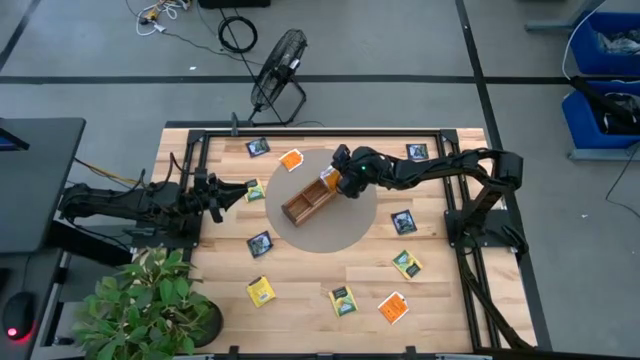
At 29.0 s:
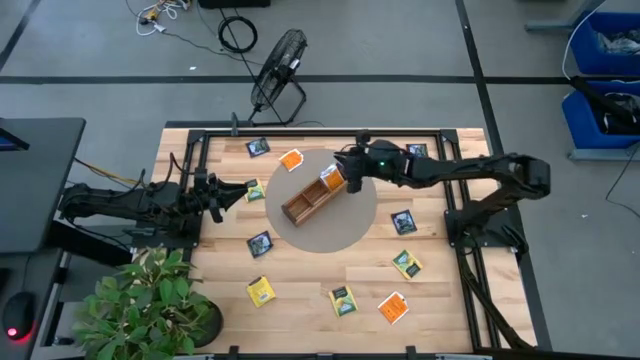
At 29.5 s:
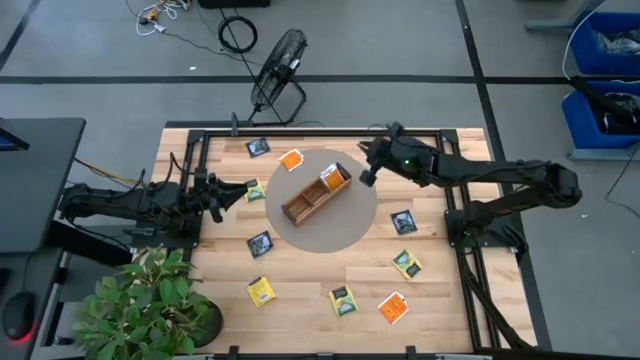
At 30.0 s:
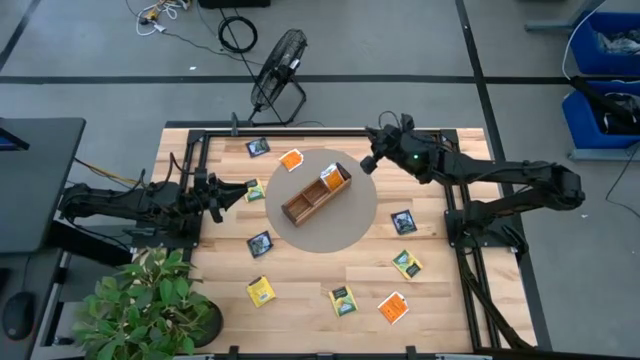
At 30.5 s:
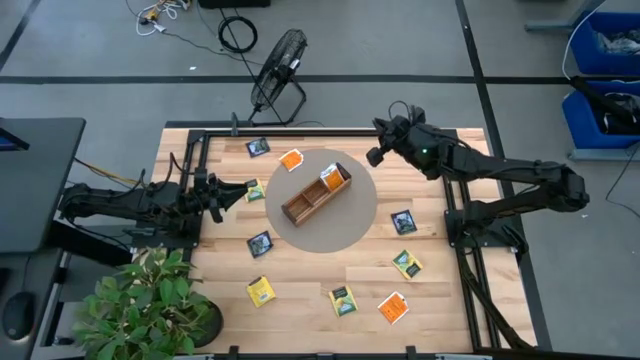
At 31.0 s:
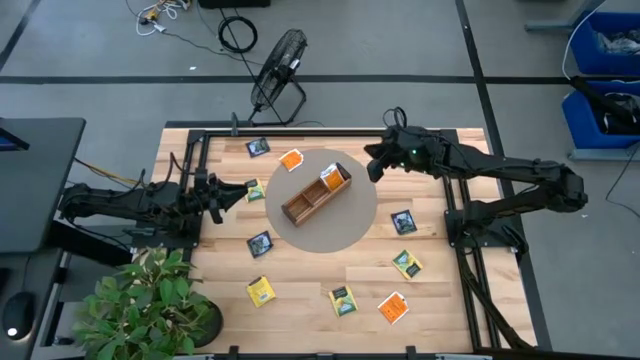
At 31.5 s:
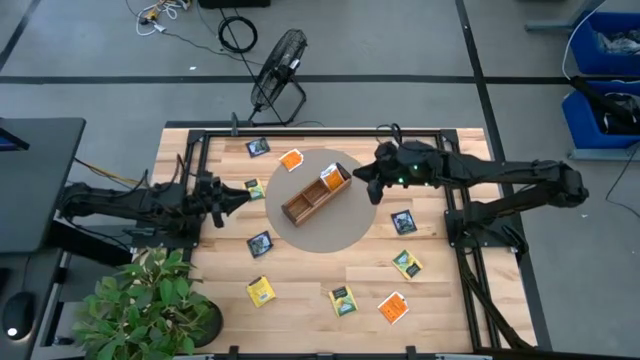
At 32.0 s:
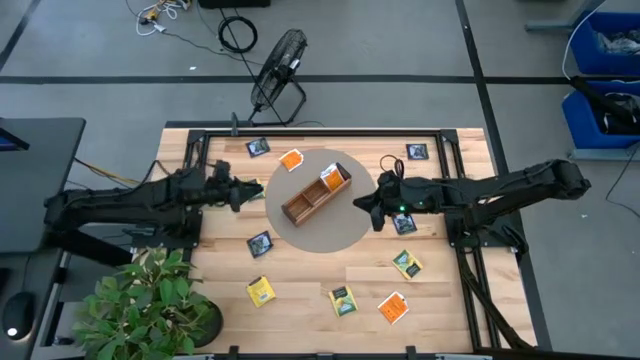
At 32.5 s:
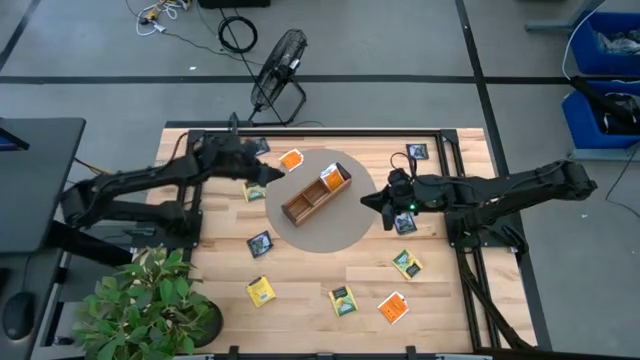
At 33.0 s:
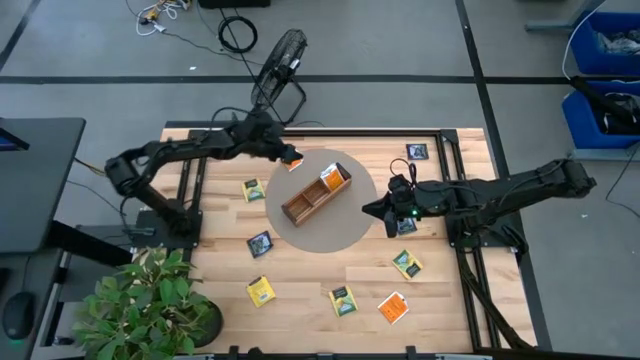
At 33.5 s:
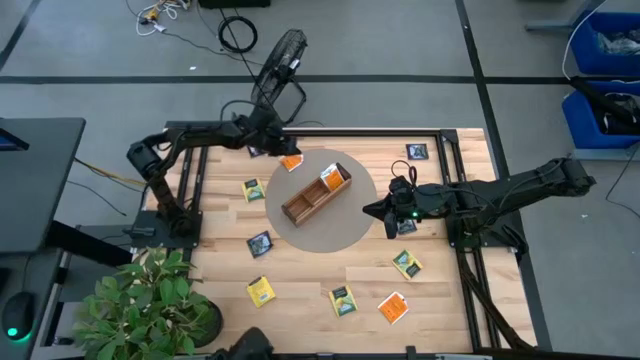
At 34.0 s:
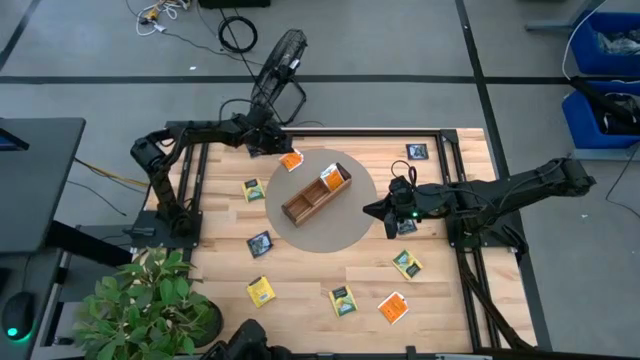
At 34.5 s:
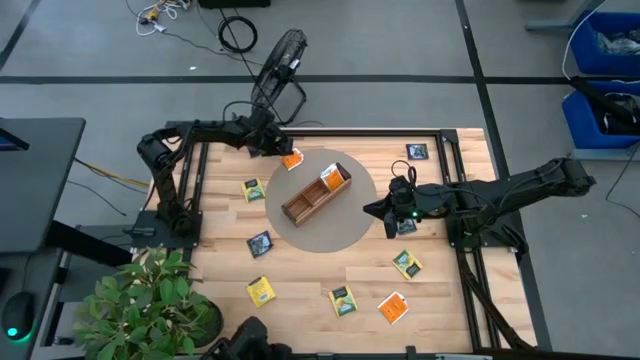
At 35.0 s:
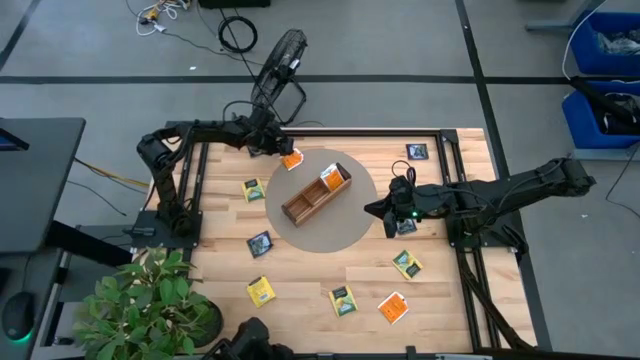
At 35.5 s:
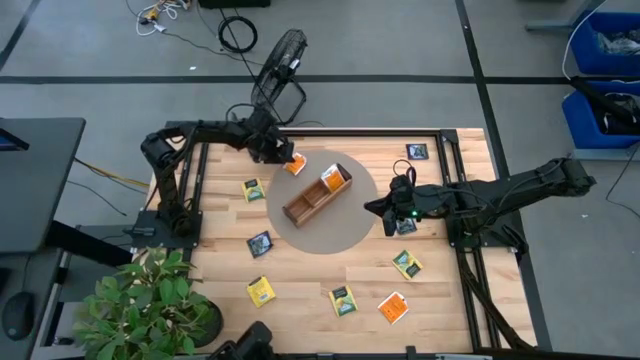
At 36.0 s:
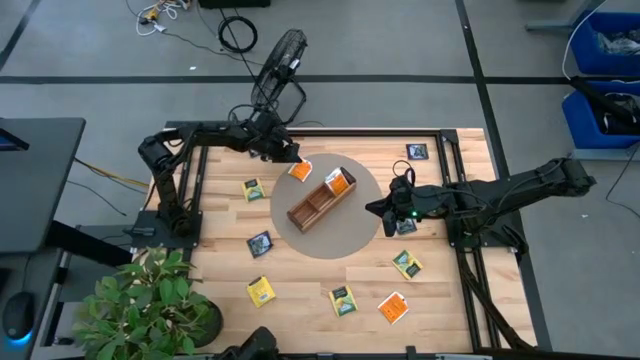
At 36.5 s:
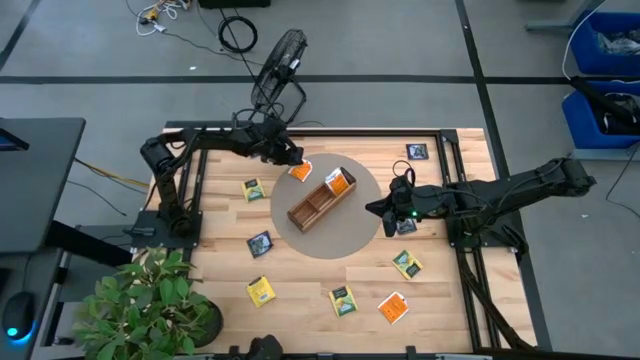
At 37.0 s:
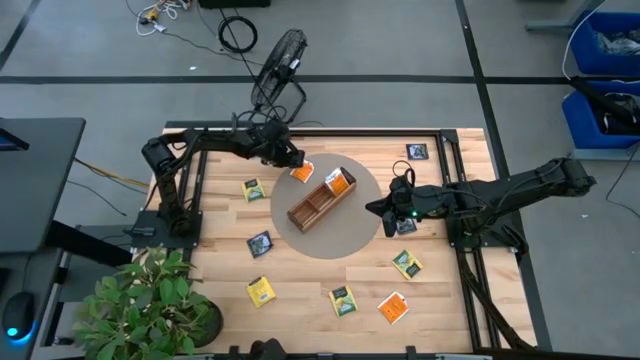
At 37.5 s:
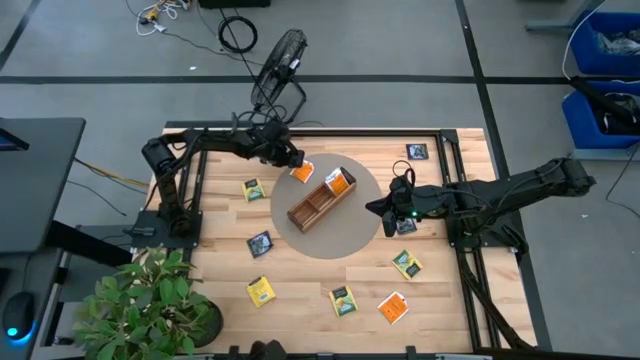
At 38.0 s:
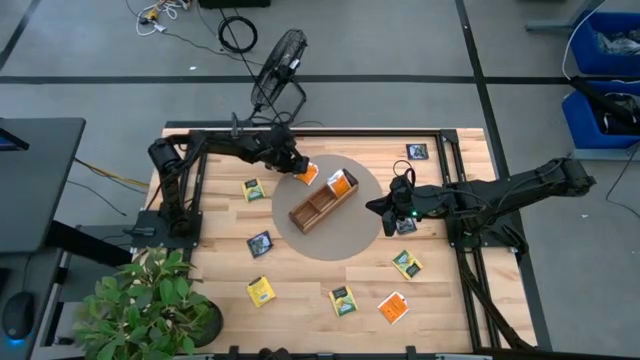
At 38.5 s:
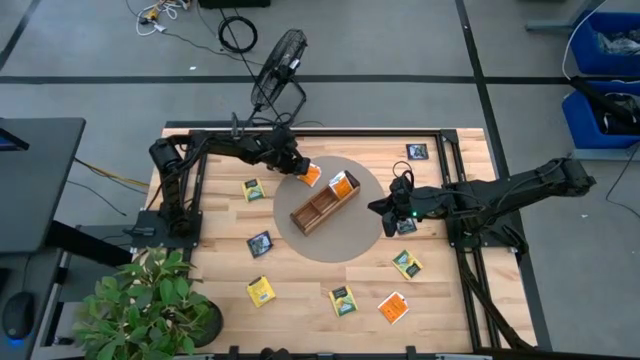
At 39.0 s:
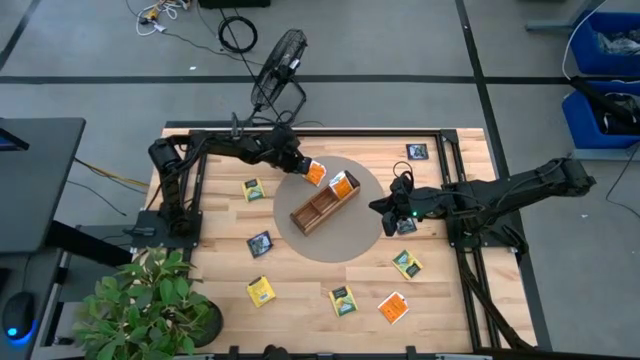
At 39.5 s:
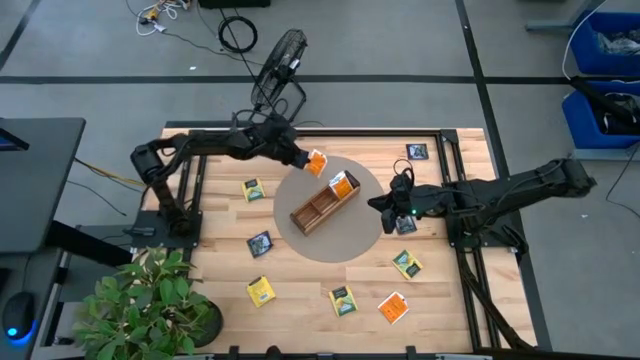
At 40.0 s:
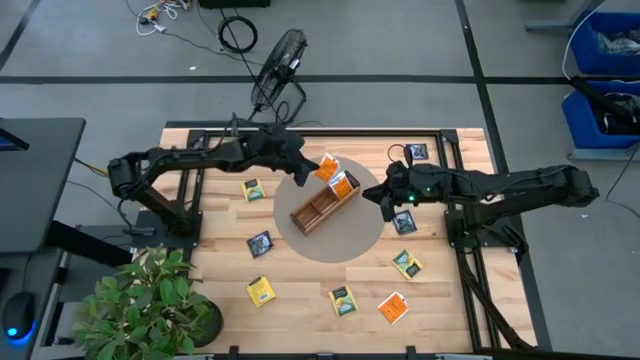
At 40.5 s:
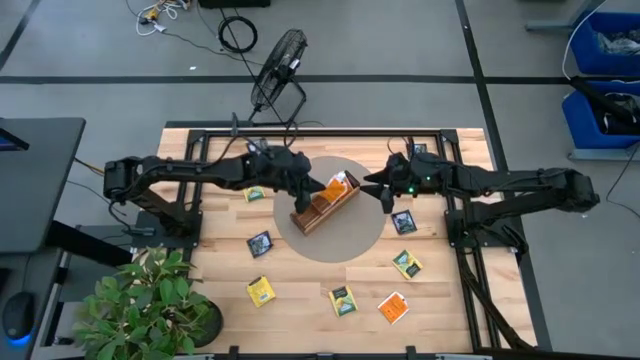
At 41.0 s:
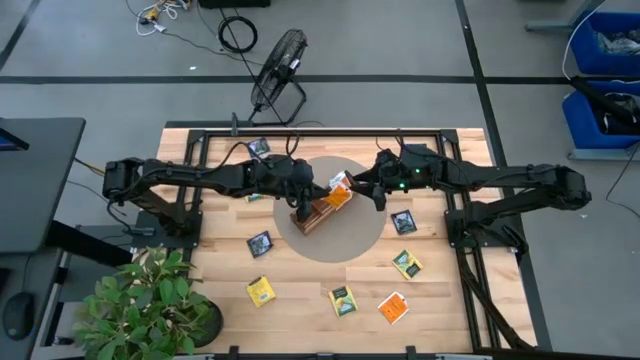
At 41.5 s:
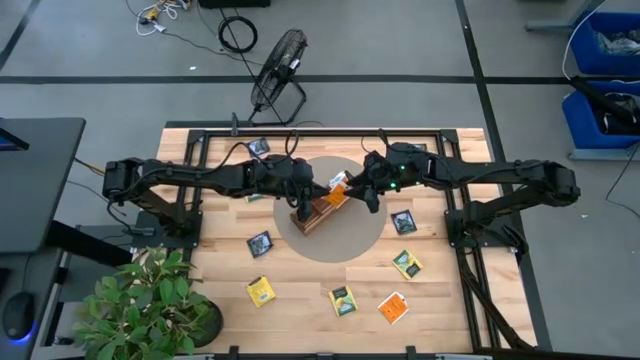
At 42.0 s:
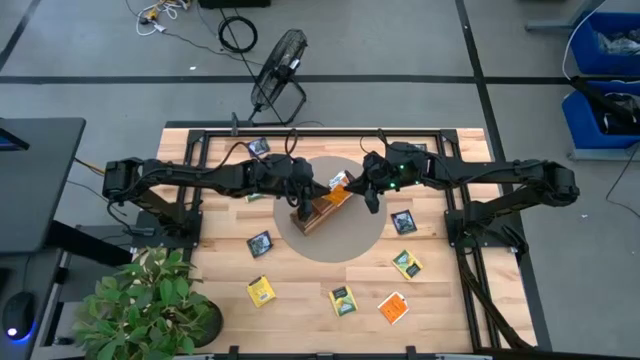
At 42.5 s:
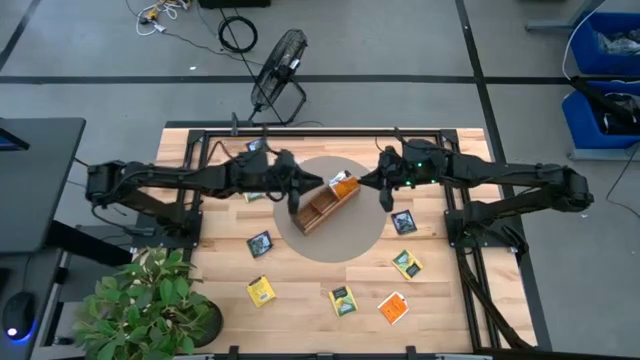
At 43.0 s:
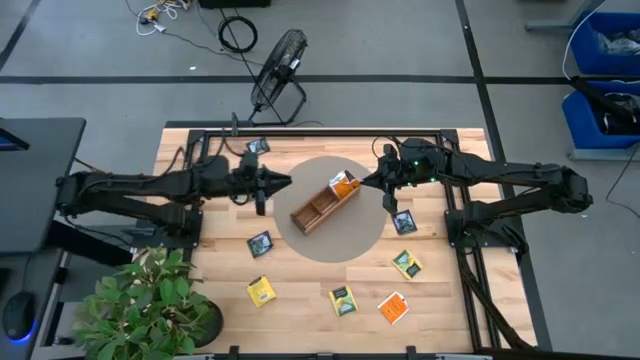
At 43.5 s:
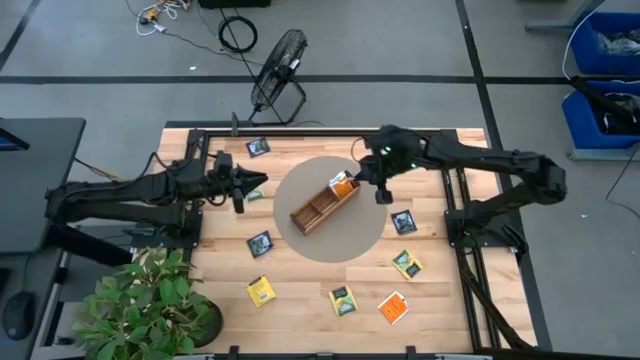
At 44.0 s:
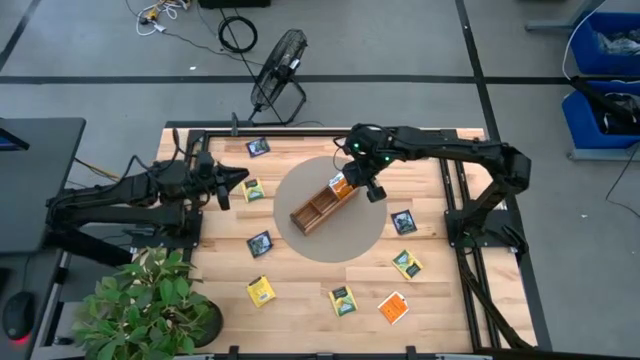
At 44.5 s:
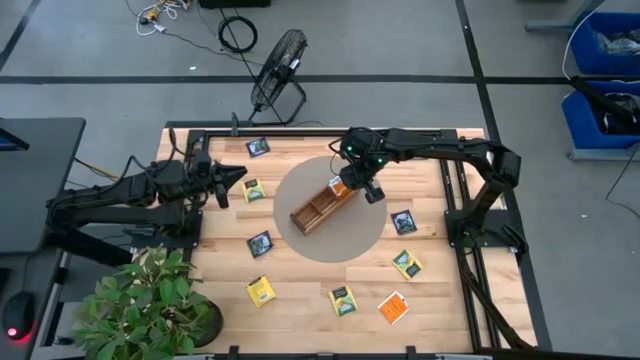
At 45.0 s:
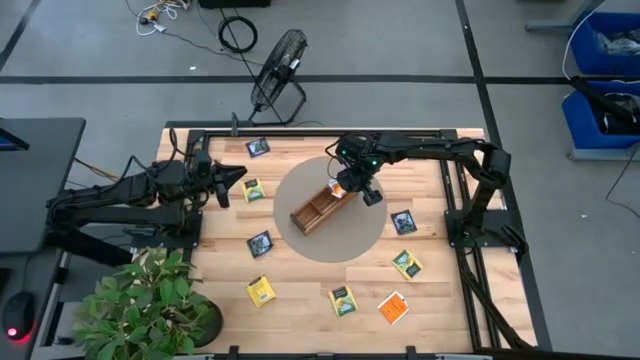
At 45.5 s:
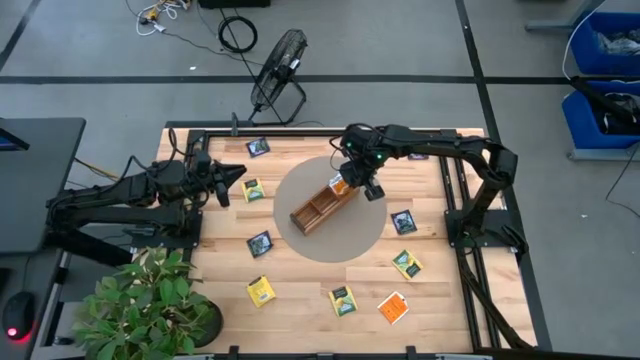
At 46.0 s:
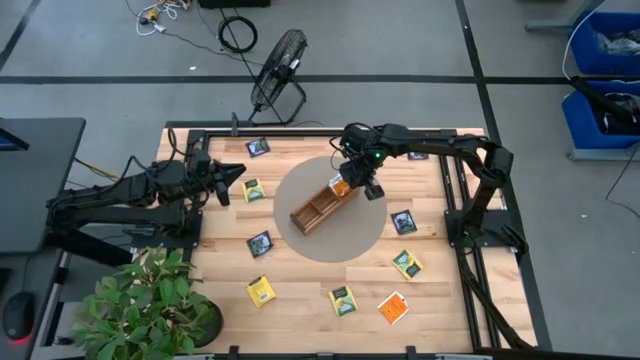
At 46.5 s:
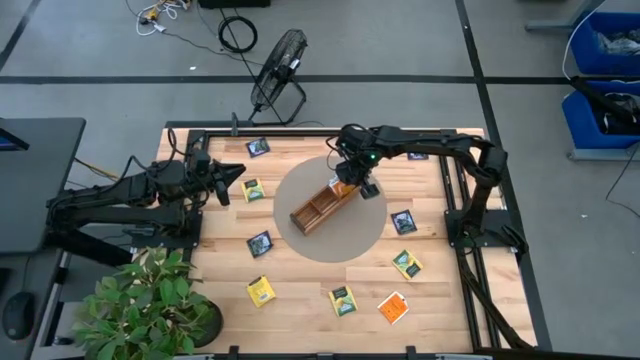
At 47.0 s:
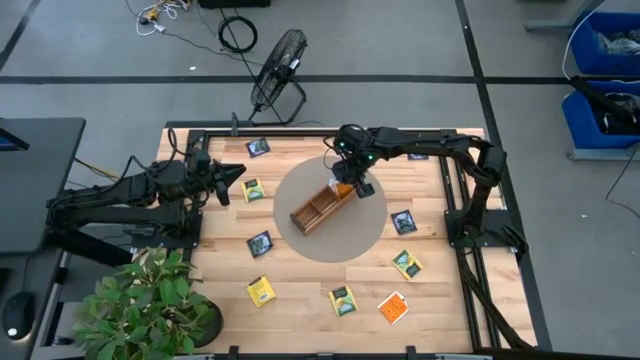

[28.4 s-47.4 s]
Task: Pick & Place Tea
Put the orange tea bag into the right section of the wooden organizer

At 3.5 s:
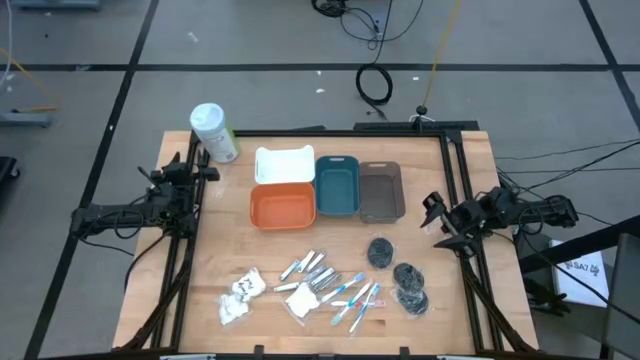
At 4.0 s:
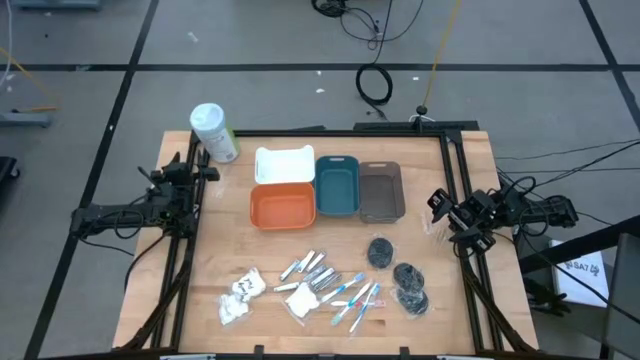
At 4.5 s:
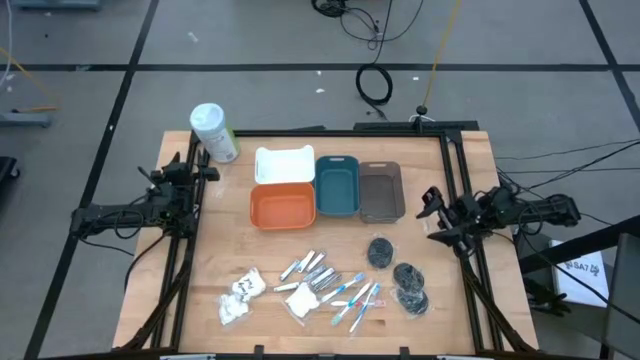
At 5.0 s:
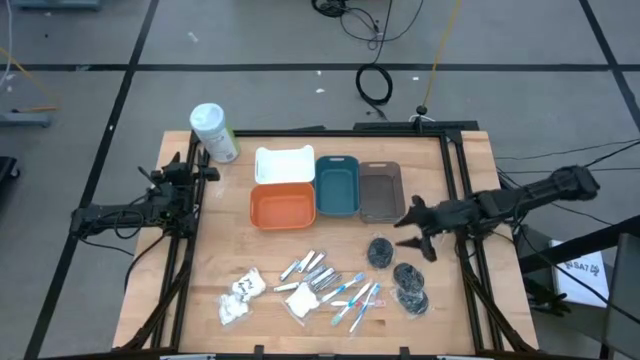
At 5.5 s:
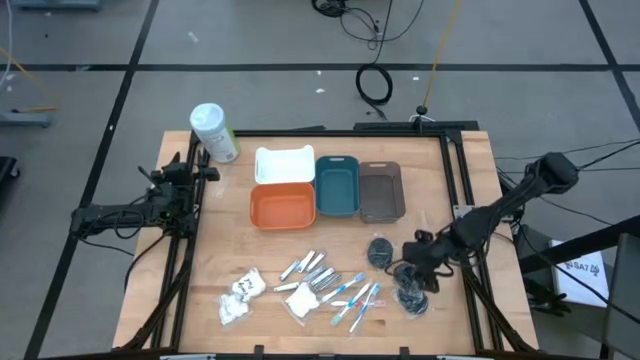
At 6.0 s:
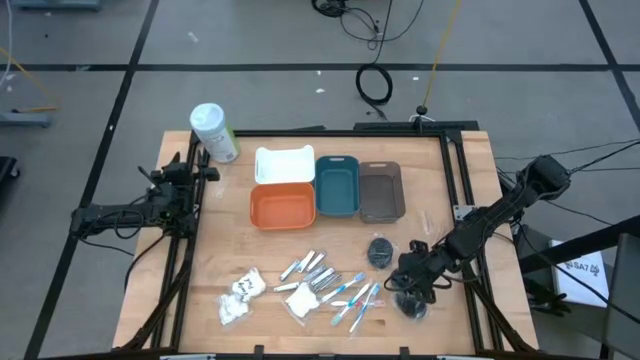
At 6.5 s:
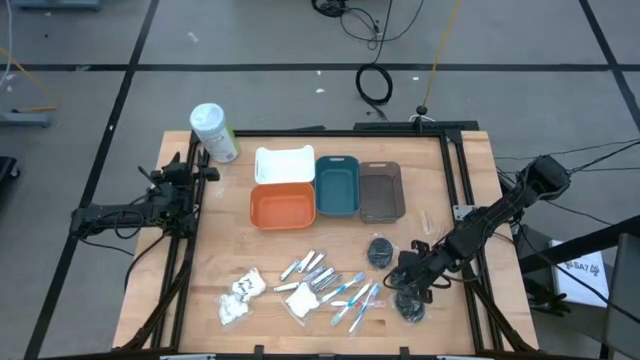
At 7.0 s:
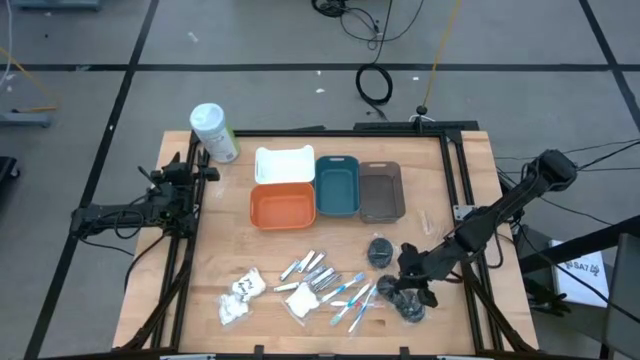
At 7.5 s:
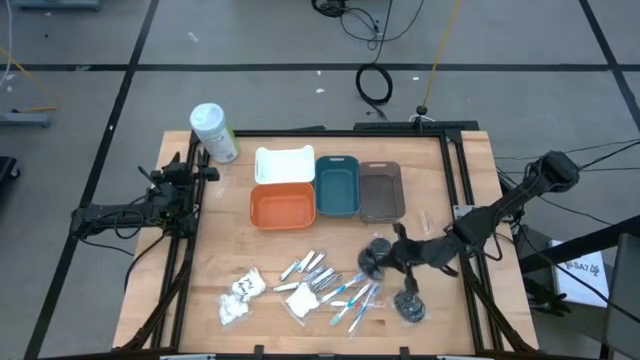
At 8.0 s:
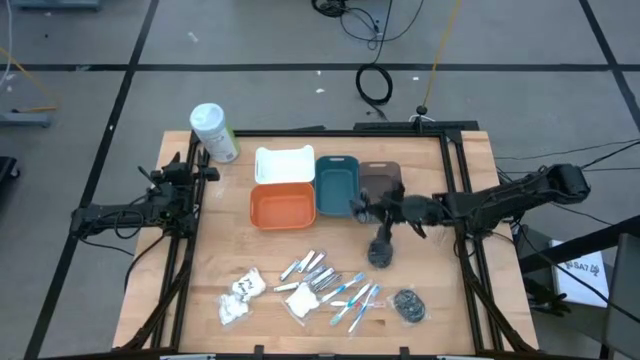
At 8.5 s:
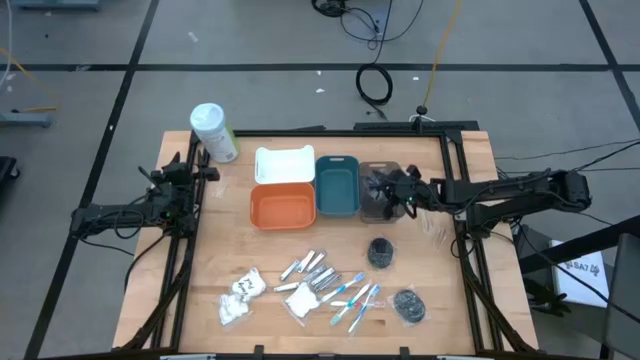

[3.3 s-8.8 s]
Task: Pick & Place Travel size toiletries
Put the black hairbrush into the transparent black bin
